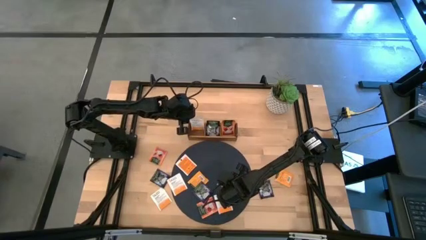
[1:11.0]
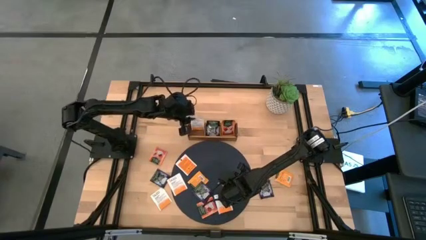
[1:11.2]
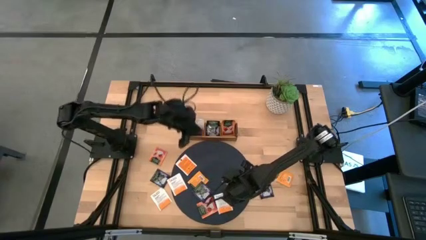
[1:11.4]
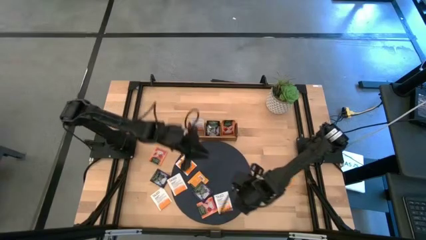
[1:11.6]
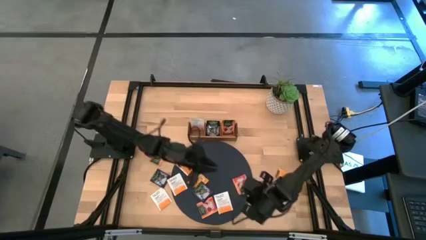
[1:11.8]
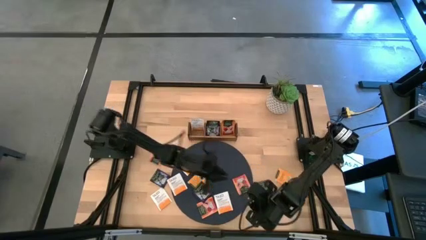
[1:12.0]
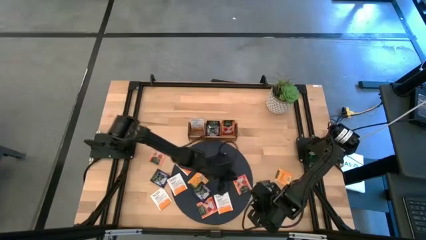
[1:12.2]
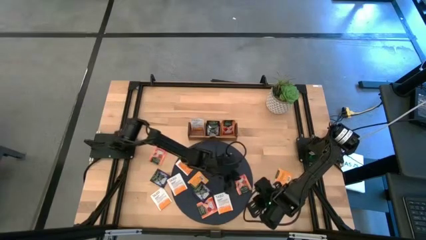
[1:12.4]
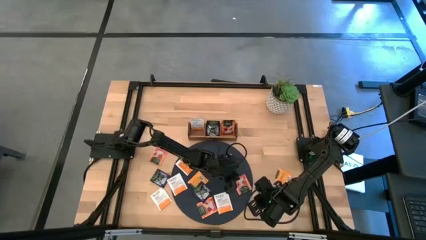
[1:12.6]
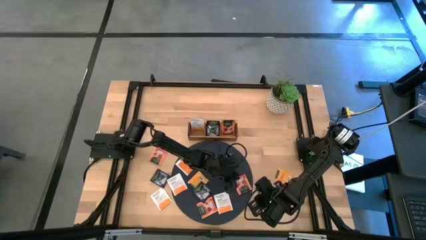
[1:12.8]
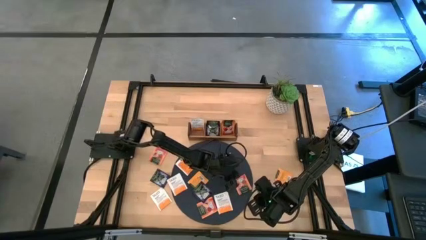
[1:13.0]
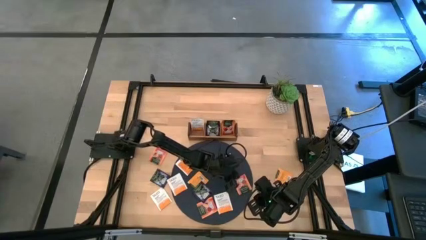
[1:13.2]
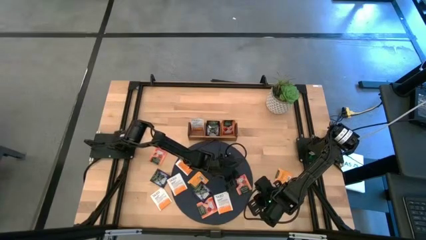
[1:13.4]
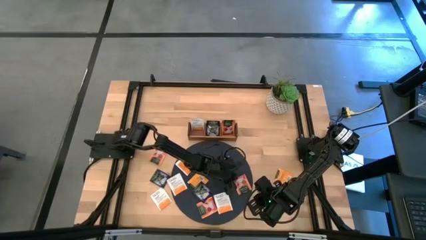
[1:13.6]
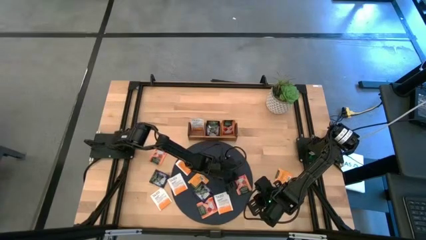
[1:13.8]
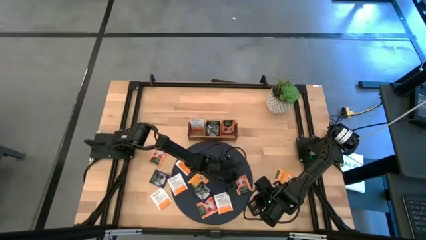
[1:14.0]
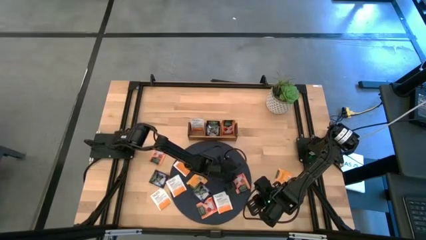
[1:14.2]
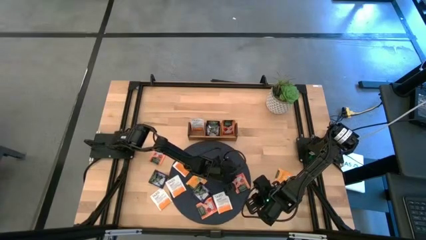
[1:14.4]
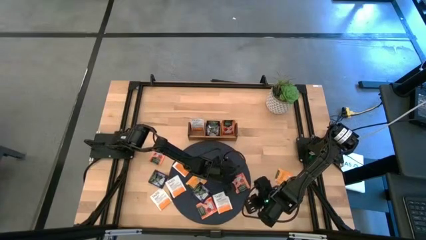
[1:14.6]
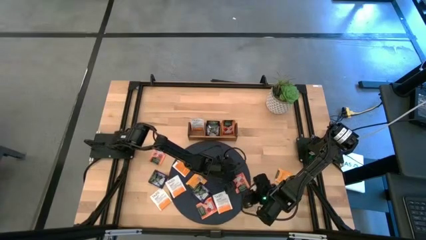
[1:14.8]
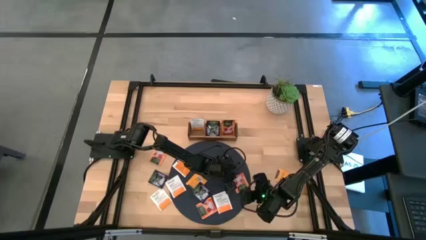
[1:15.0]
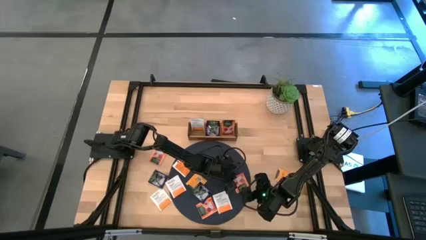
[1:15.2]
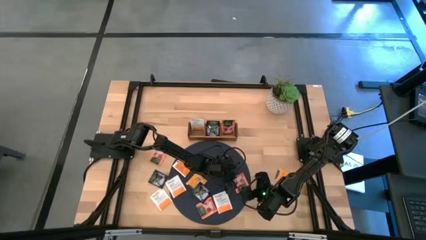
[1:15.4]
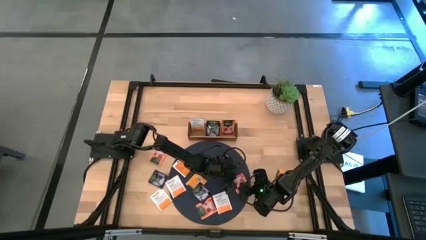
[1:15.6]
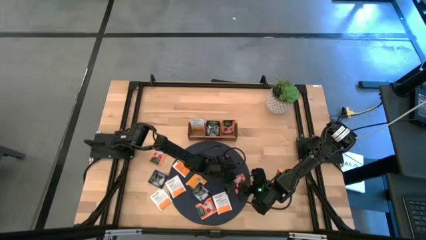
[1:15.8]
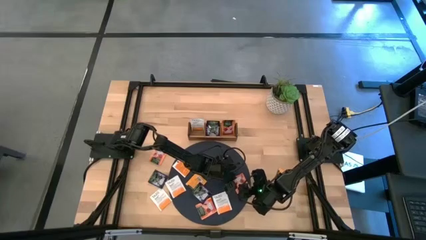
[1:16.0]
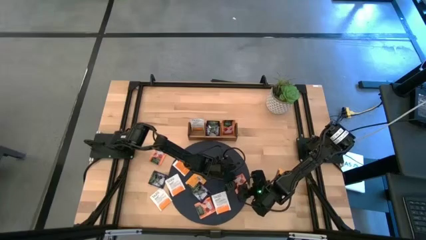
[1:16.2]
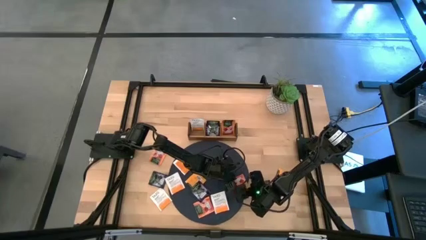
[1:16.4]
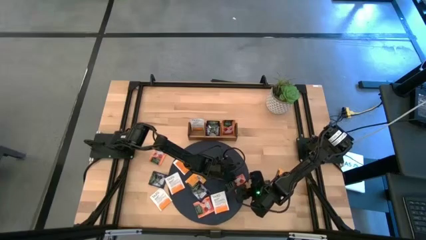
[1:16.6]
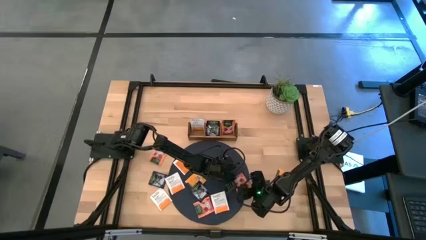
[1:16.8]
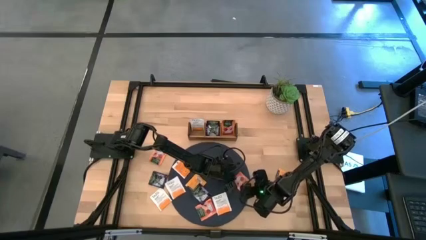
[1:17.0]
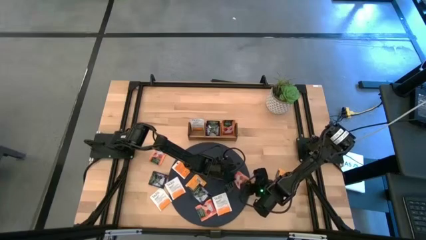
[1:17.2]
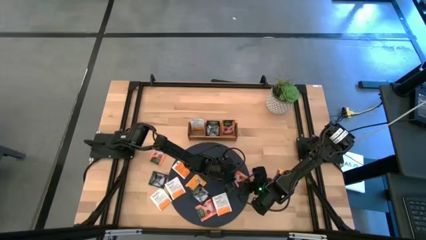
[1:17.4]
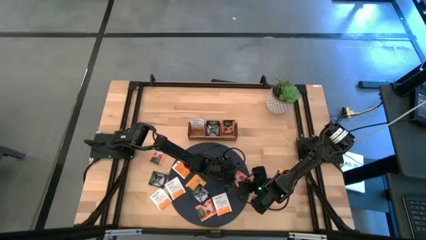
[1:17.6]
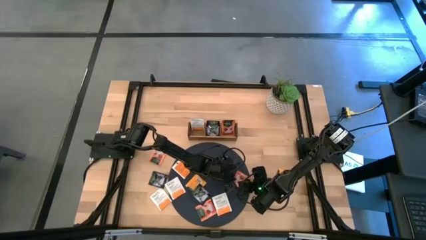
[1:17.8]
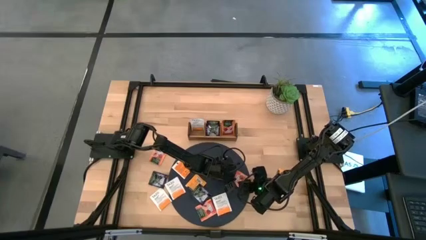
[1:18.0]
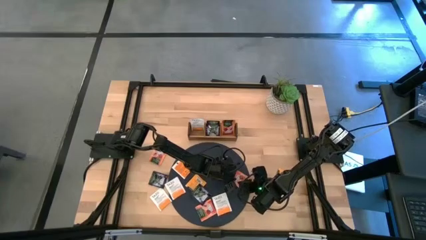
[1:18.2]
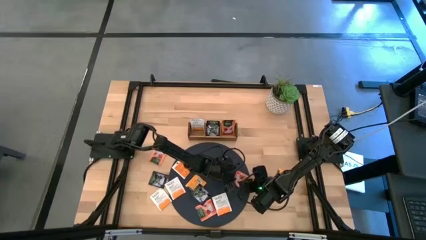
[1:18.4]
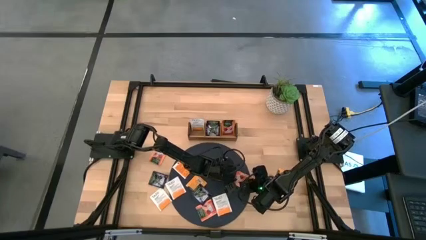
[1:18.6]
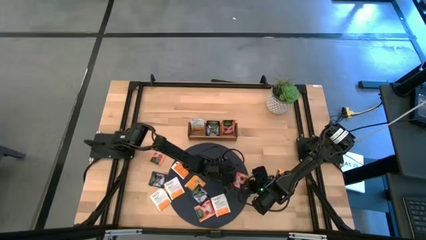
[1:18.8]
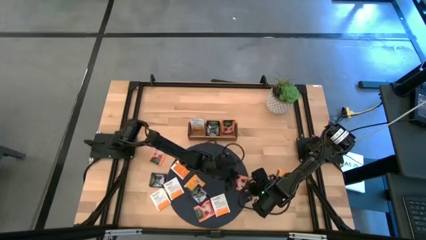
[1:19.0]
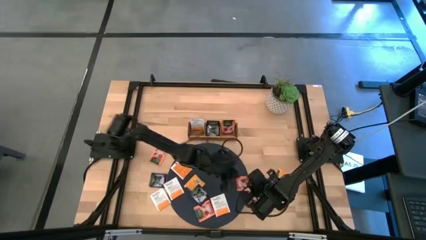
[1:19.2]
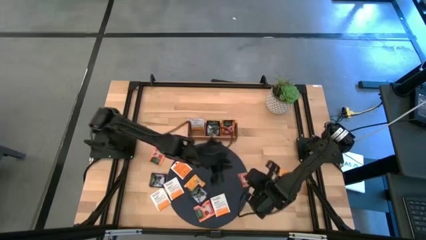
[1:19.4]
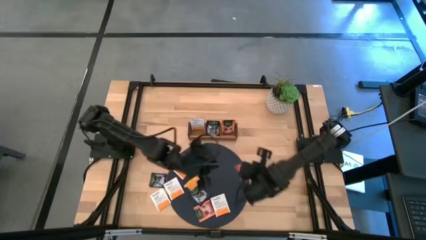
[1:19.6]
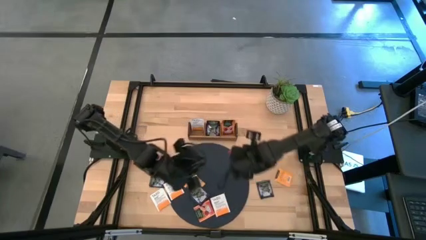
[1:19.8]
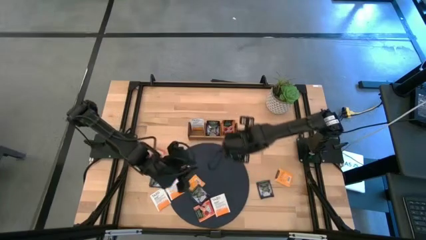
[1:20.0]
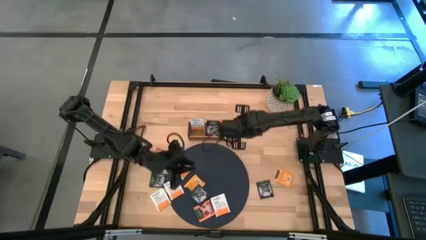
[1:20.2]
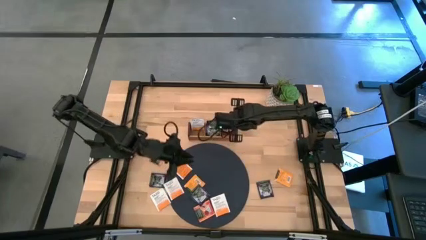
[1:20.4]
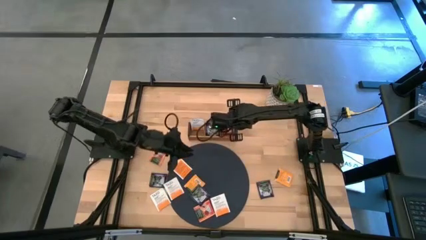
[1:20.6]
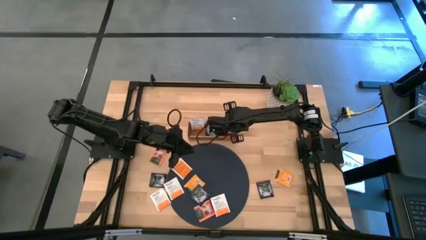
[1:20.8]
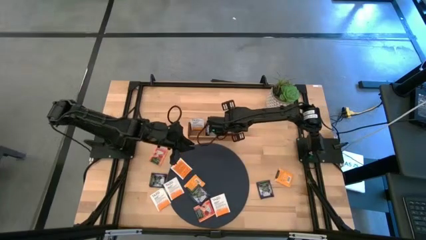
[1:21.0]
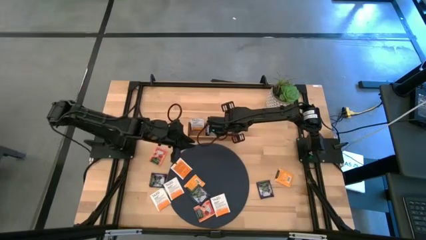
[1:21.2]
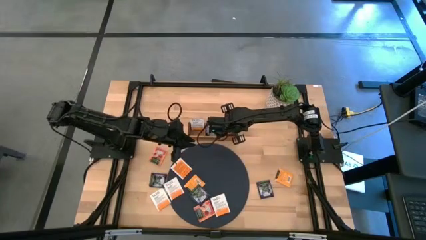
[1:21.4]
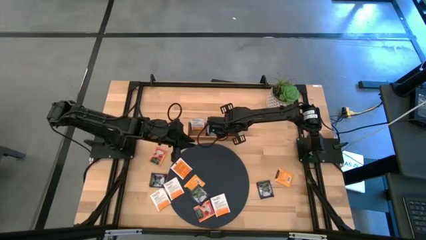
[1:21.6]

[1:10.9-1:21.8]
Task: Pick & Place Tea
Put the orange tea bag into the right of the wooden organizer

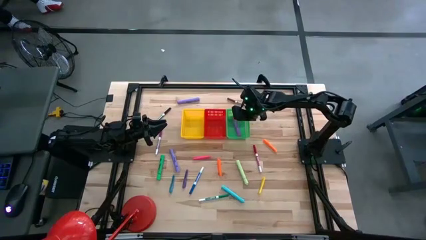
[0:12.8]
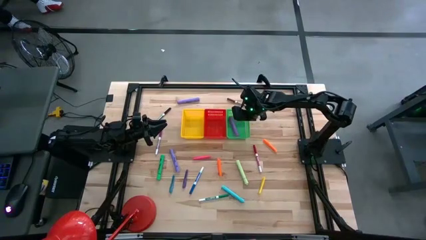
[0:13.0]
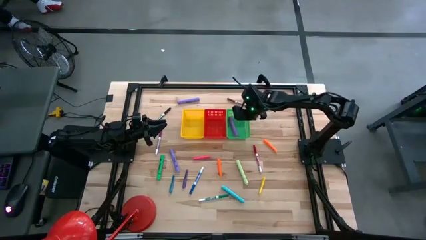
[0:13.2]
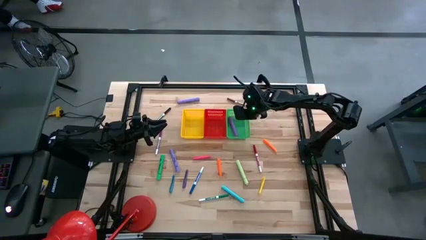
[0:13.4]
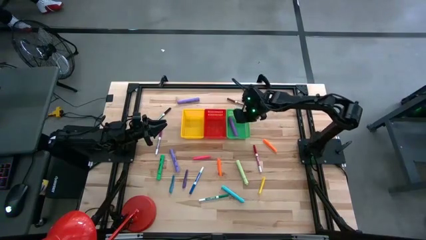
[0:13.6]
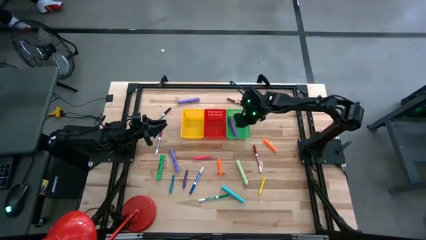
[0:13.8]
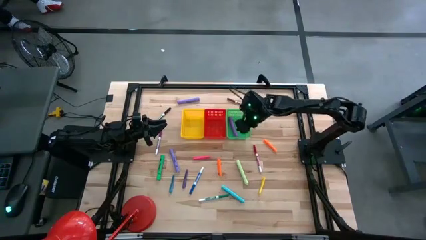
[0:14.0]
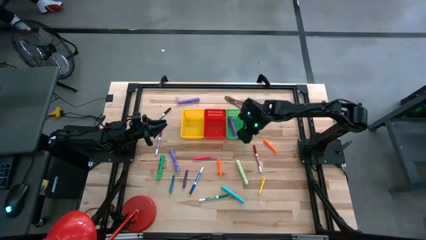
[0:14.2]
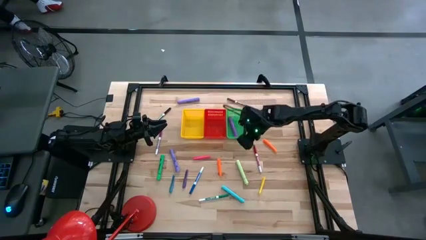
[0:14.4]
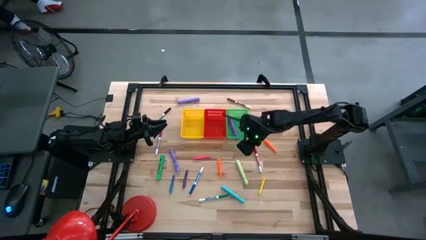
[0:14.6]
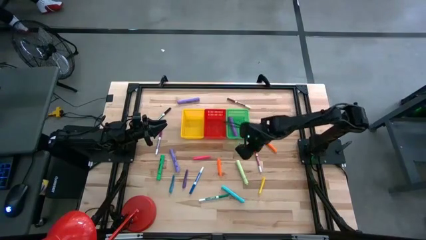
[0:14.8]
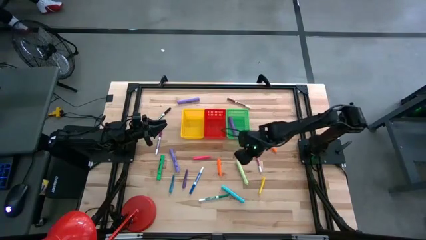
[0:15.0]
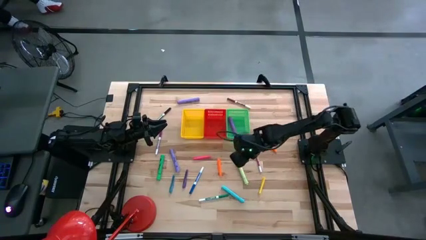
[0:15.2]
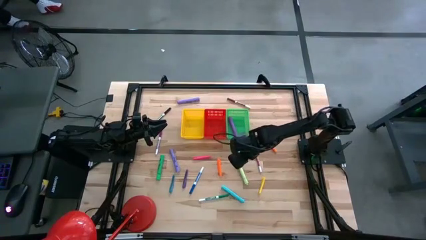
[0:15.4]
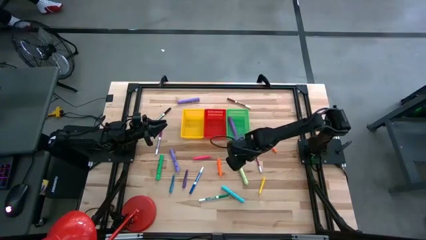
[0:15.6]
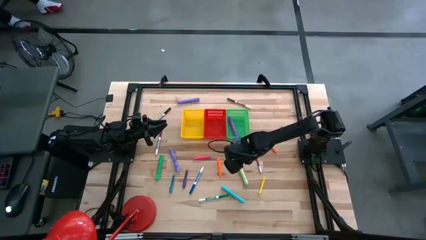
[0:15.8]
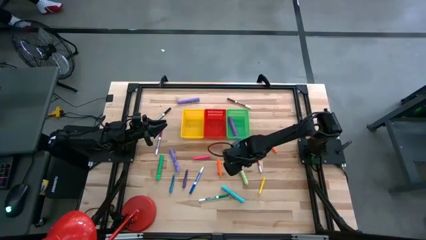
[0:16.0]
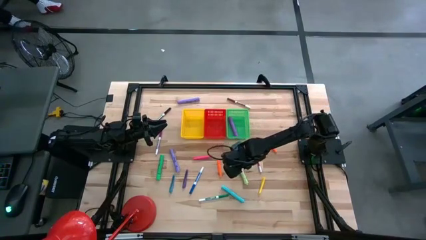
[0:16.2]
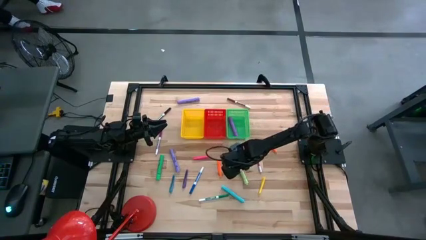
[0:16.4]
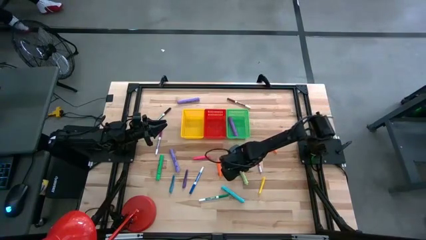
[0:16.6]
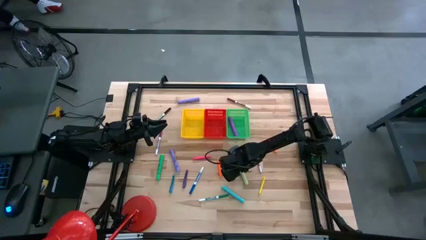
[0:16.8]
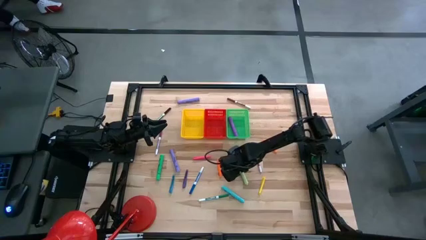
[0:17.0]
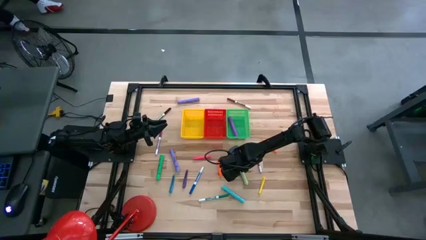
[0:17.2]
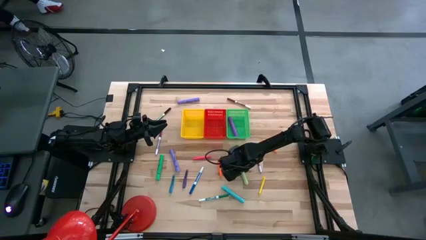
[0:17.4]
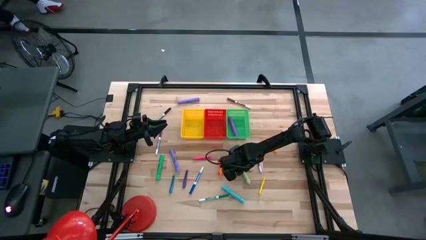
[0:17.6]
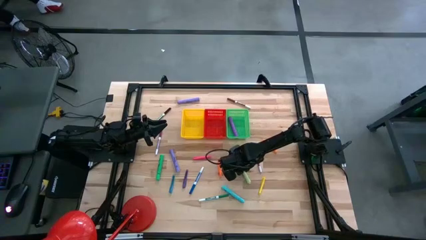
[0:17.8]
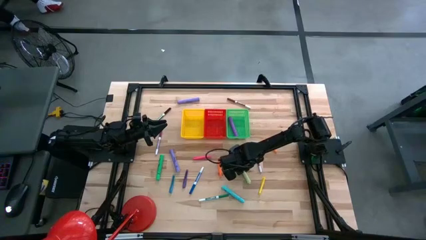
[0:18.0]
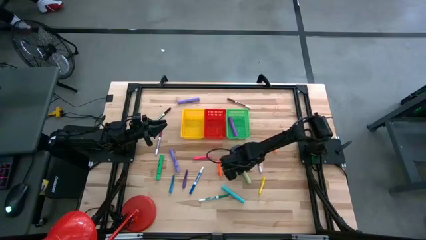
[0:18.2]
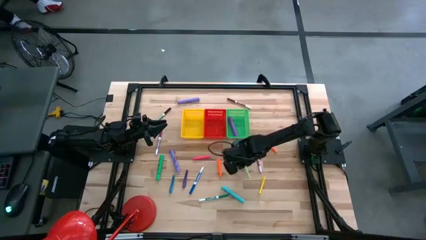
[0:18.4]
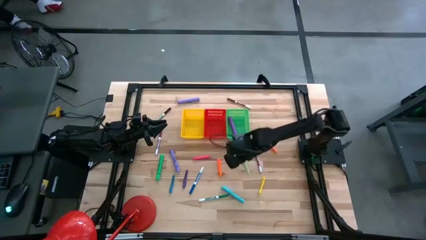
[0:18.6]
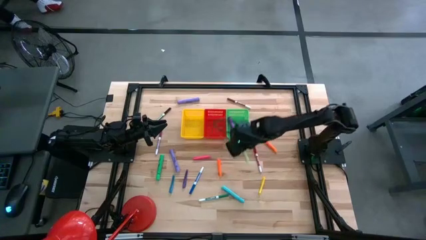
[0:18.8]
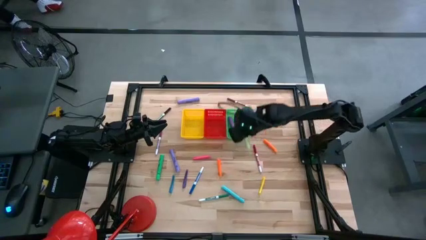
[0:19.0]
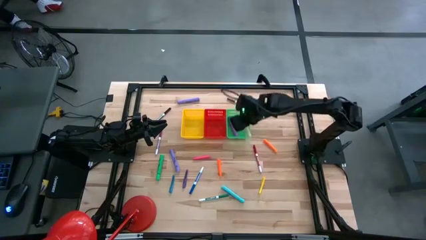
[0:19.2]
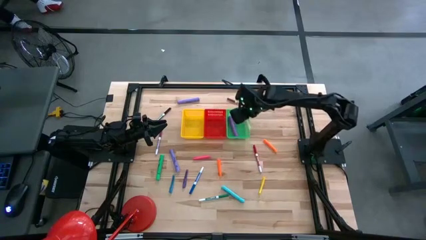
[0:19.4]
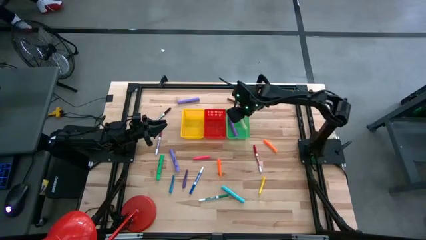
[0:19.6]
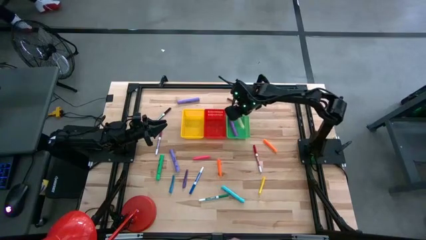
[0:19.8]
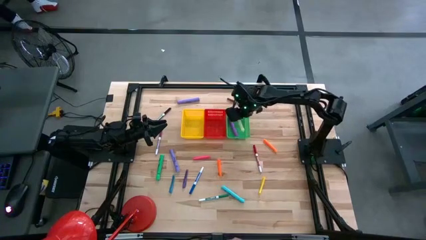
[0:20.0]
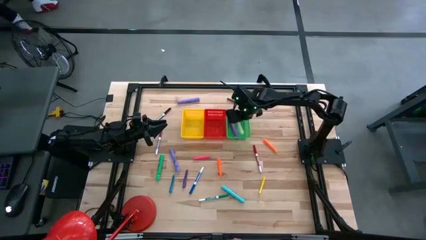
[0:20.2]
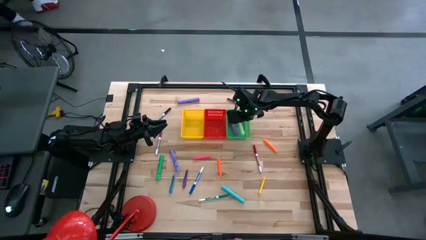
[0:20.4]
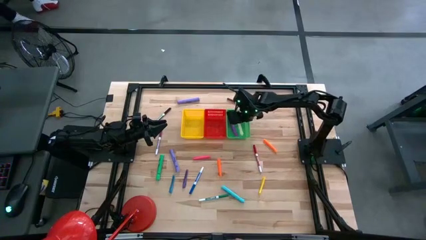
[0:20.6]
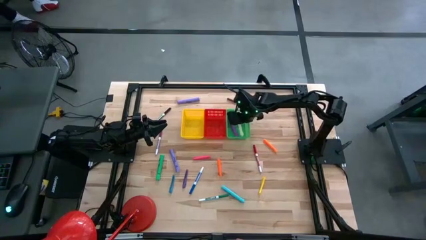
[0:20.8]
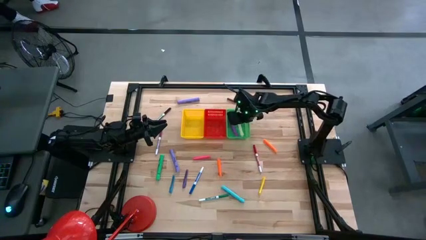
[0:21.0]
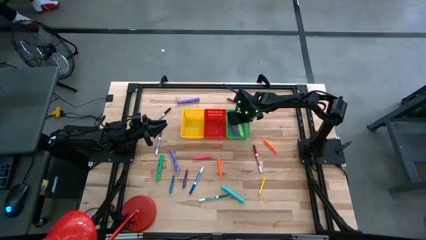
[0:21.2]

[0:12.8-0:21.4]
Task: Pick & Place Markers
Put the light green highlighter into the green bin
